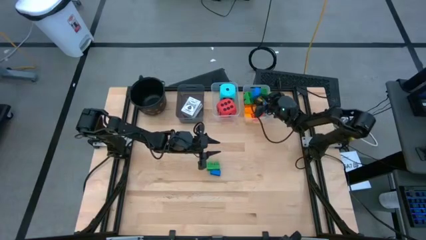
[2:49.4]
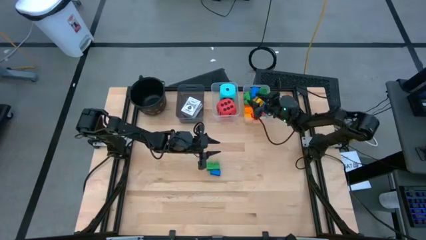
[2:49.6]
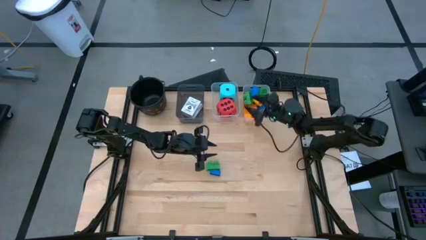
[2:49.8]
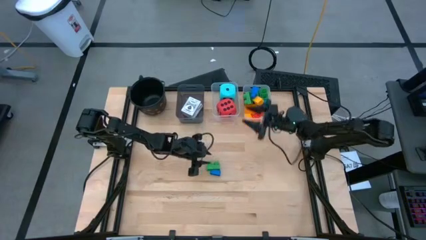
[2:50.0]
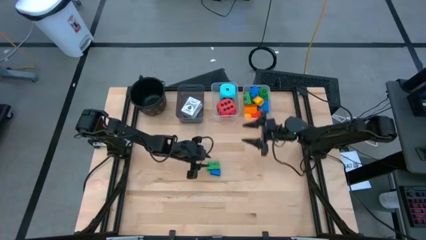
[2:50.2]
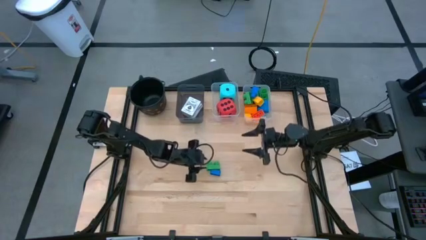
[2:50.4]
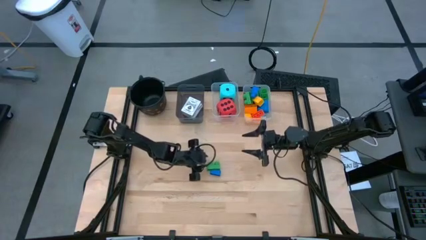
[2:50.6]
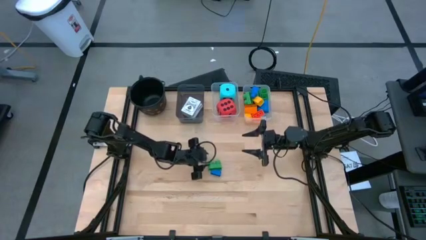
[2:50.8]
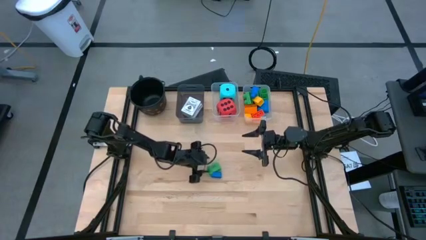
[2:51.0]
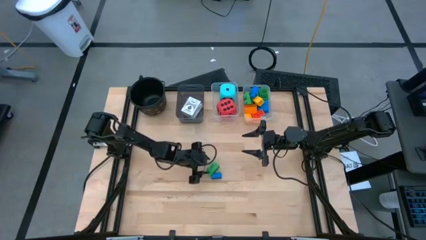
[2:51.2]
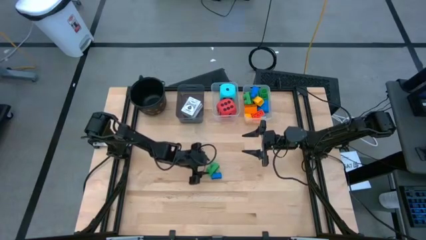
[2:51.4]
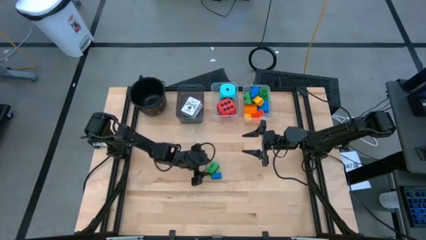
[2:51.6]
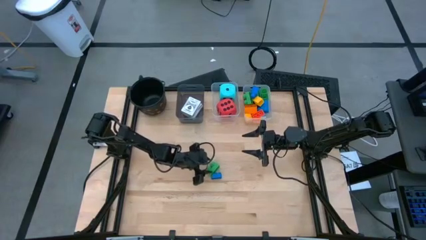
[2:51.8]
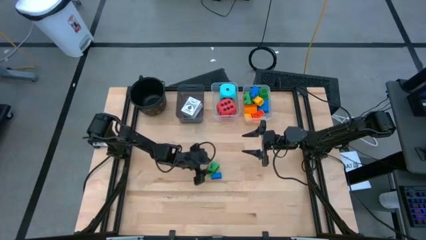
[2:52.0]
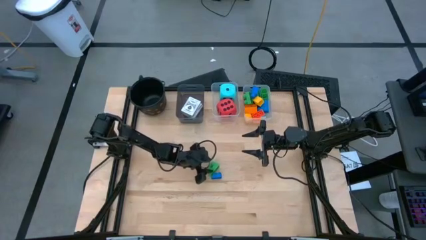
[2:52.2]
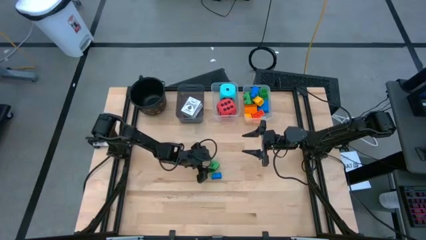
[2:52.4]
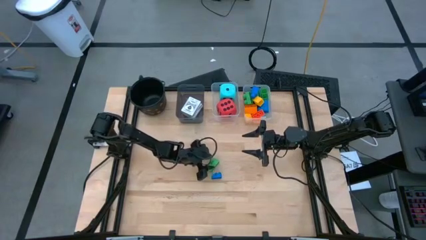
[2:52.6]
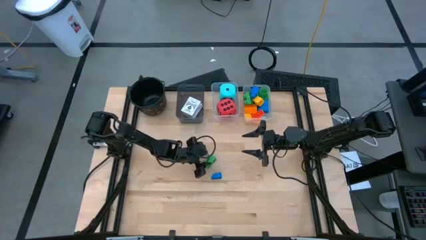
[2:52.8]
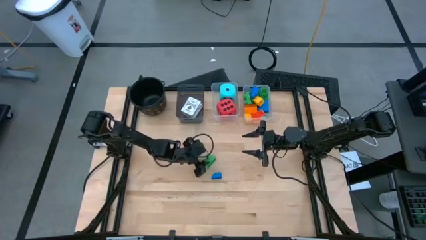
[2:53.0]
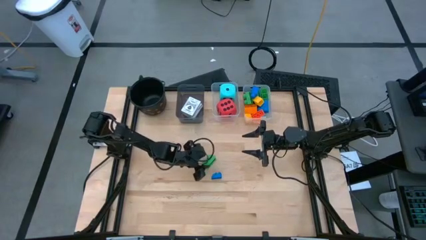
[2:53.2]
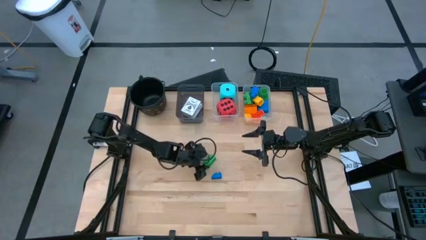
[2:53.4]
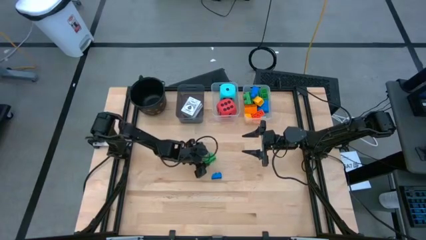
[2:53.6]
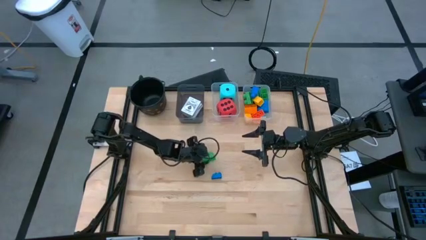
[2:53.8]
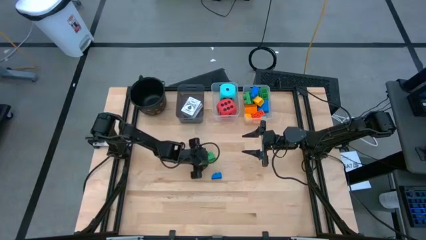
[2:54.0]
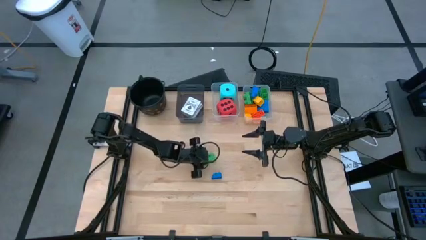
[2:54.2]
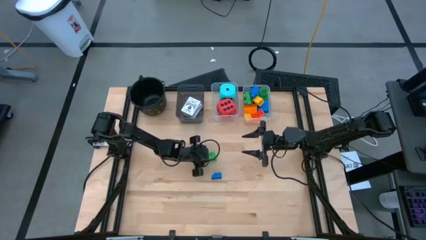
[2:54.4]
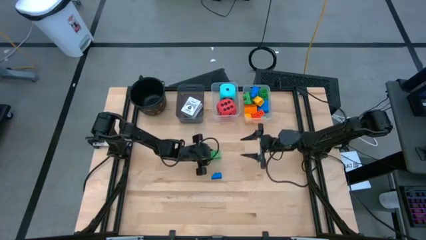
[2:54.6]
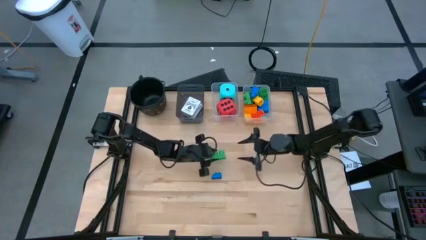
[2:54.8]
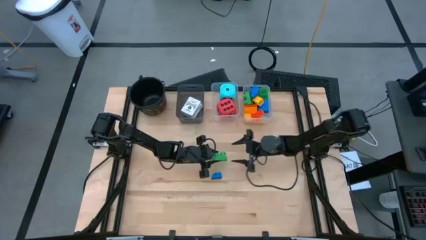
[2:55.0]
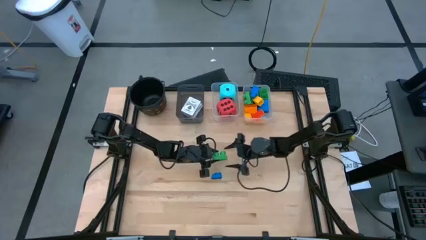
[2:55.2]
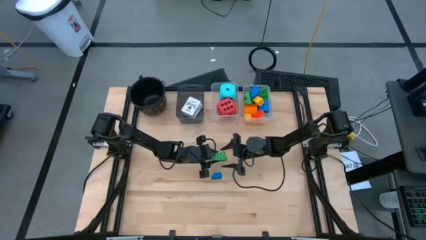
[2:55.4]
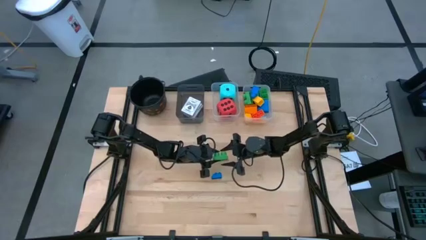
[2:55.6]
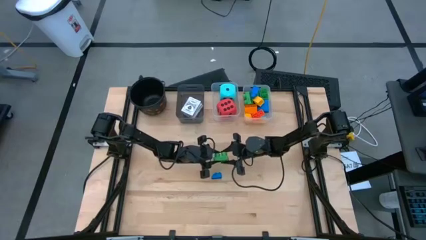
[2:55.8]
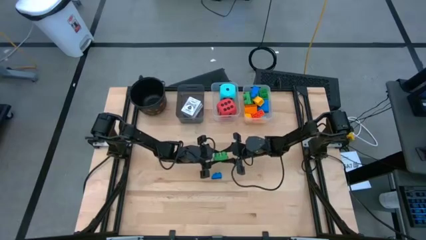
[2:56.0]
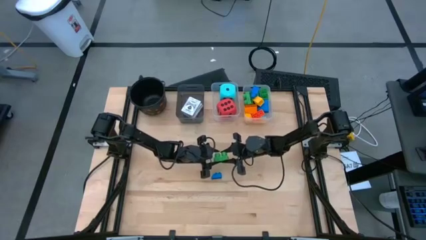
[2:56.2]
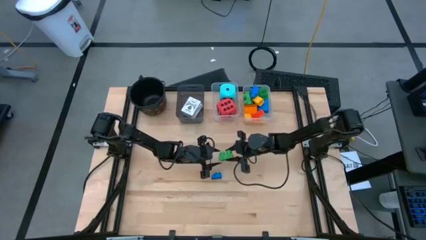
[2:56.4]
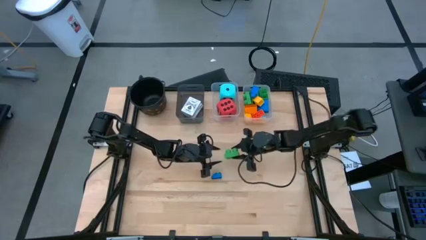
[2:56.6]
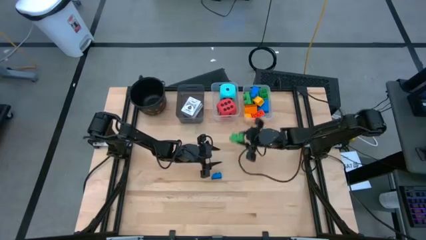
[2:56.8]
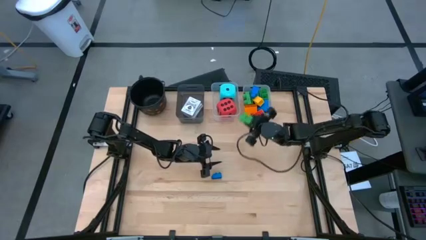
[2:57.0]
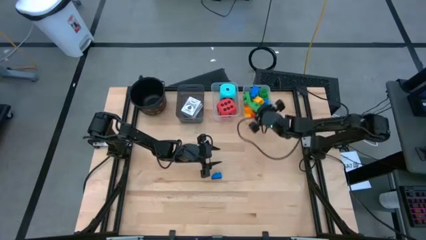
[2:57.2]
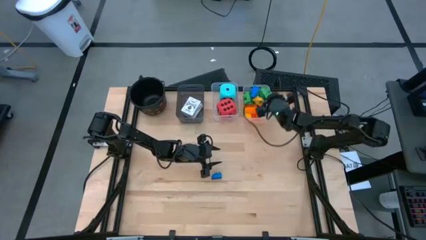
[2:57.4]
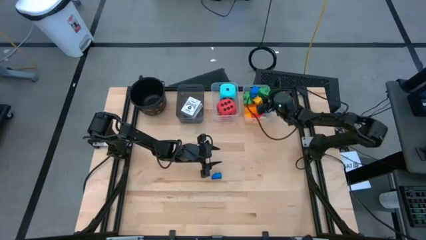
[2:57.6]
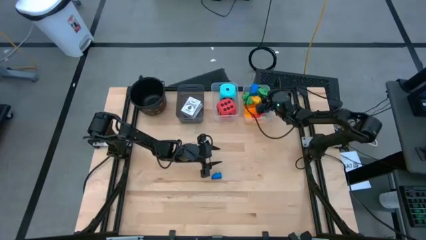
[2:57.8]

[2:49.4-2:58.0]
Task: Pick & Place Toys
Put the green two stud game piece into the right transparent bin

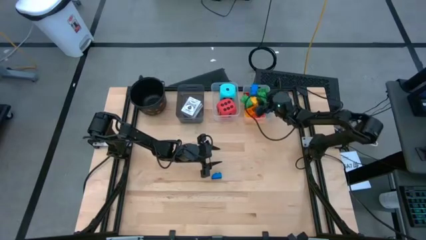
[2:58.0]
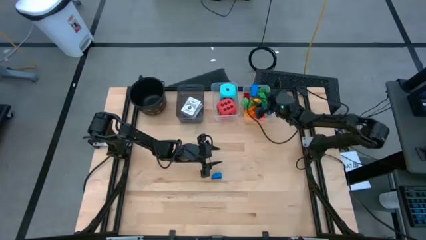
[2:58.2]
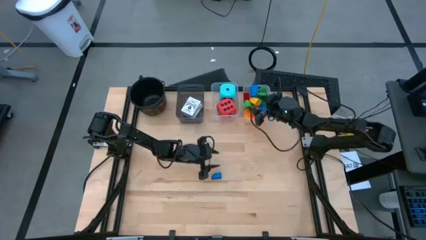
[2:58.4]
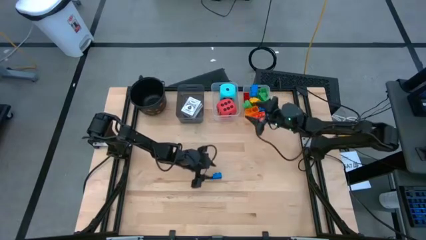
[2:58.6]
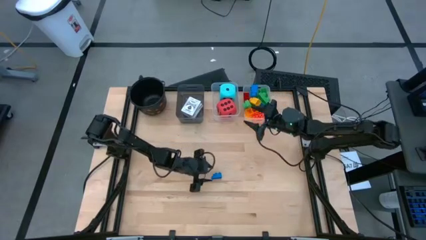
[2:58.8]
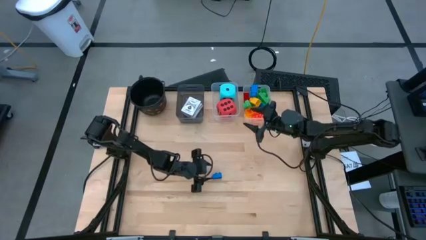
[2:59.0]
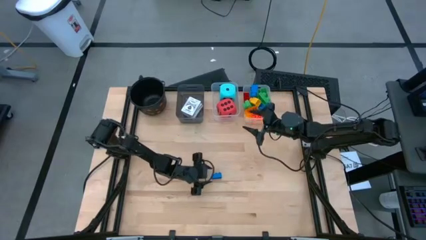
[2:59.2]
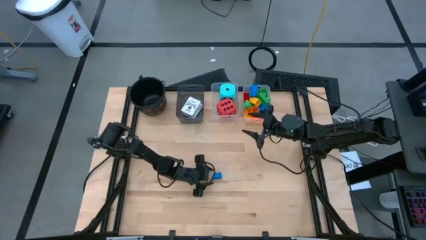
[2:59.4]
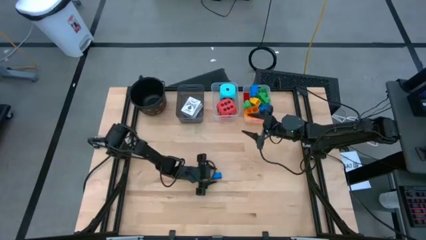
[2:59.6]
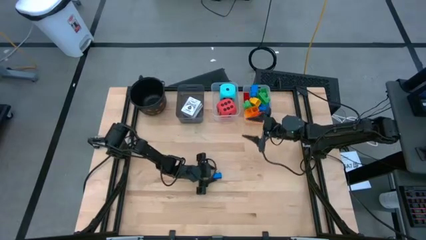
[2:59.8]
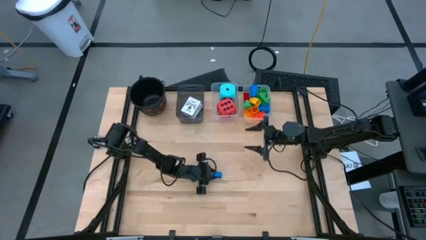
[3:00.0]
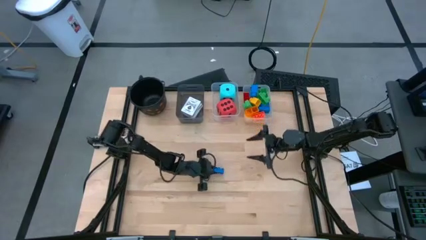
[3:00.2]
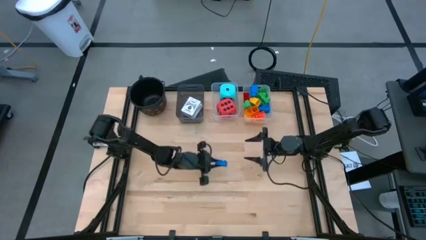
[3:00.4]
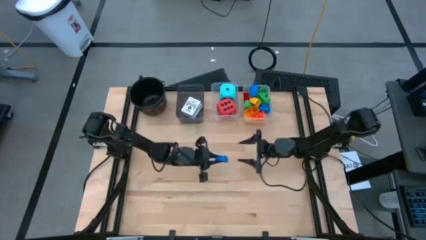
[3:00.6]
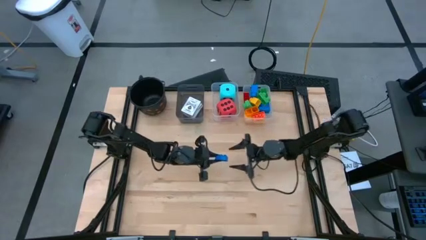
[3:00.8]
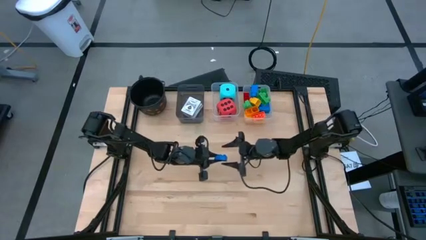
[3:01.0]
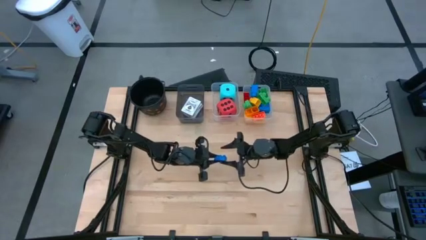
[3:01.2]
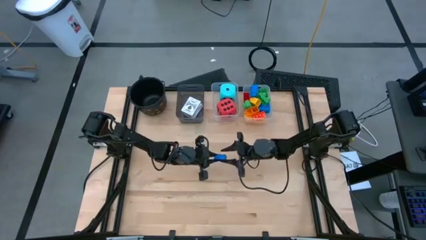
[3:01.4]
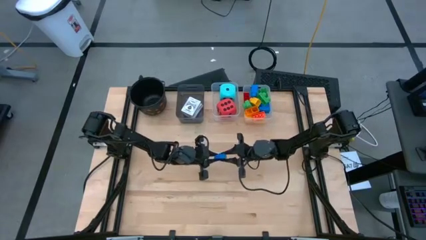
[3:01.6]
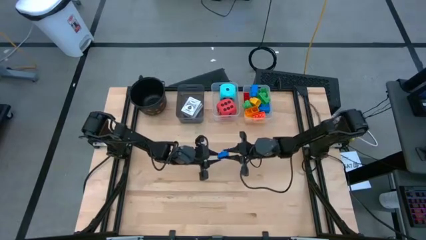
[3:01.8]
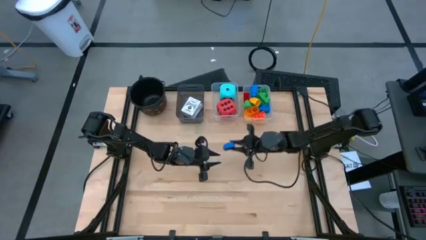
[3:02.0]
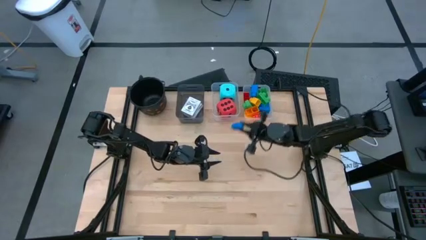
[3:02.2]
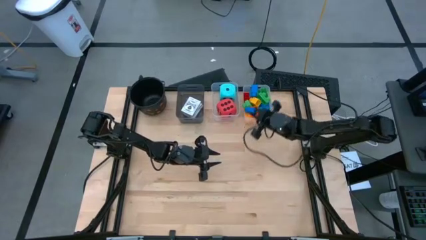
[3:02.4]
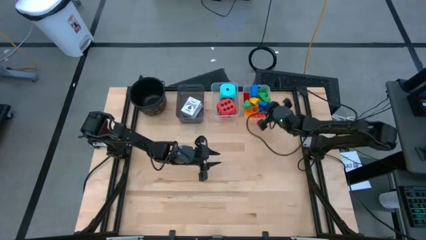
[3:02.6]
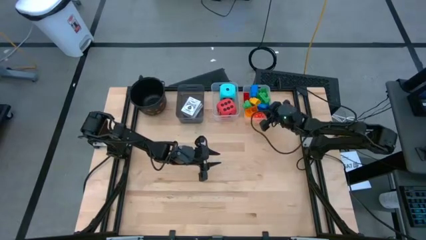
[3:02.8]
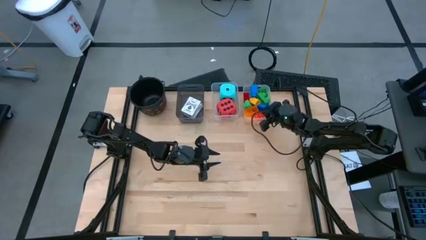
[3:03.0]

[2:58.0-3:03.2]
Put the blue block into the right transparent bin
